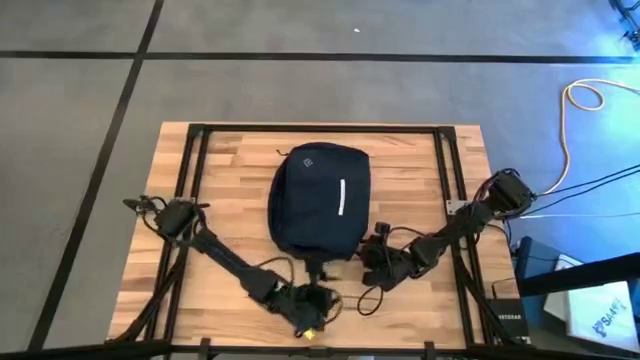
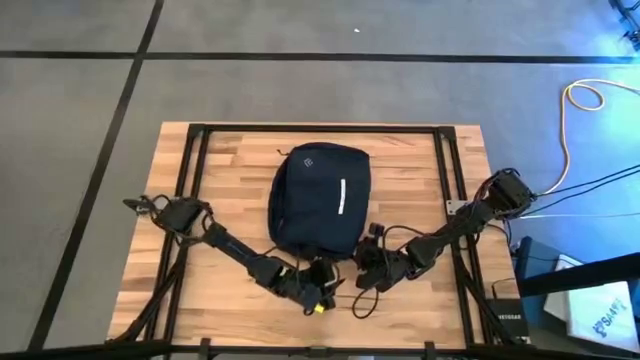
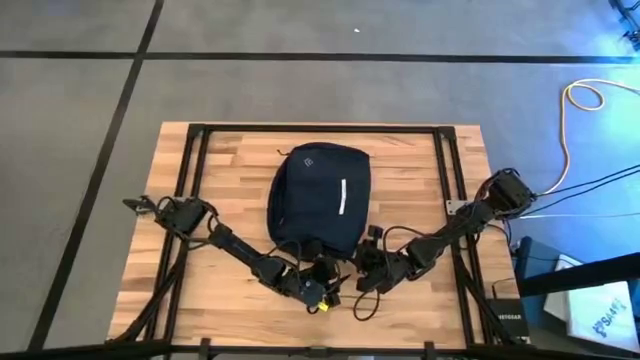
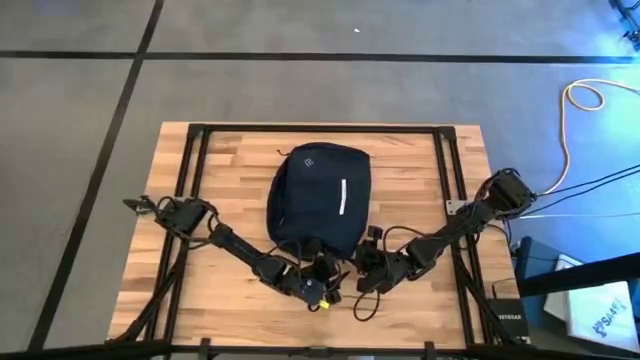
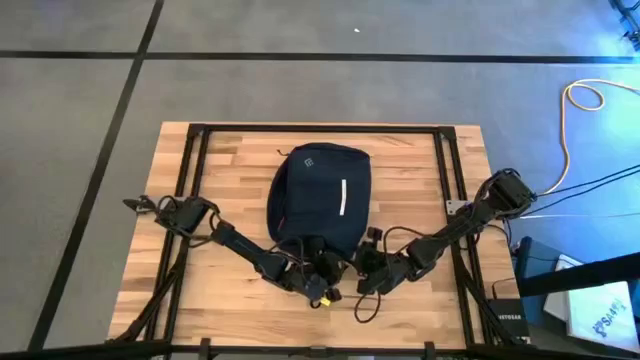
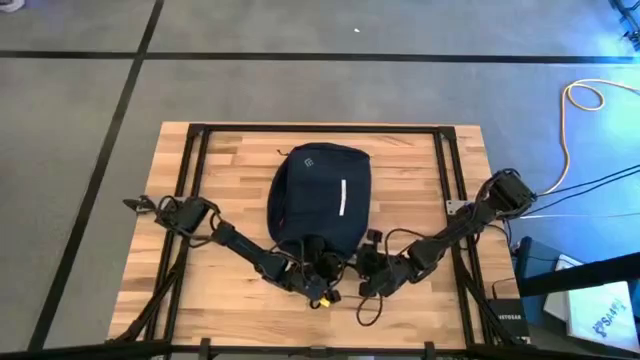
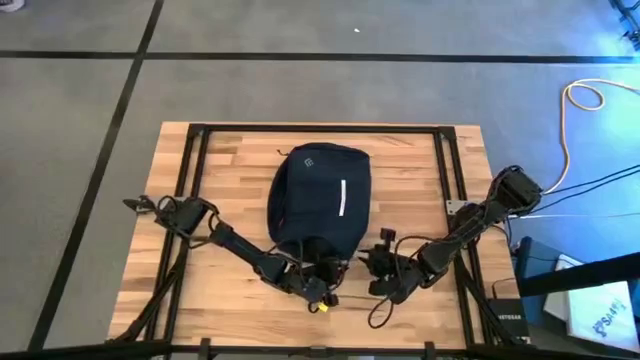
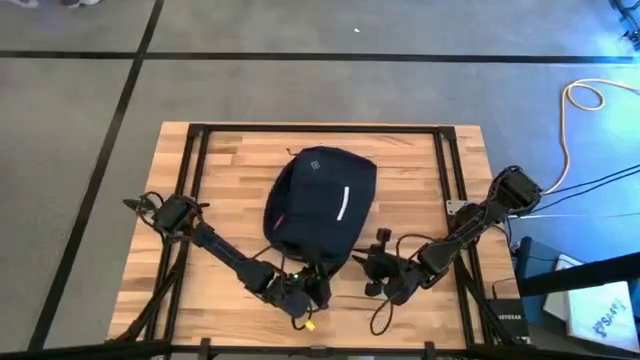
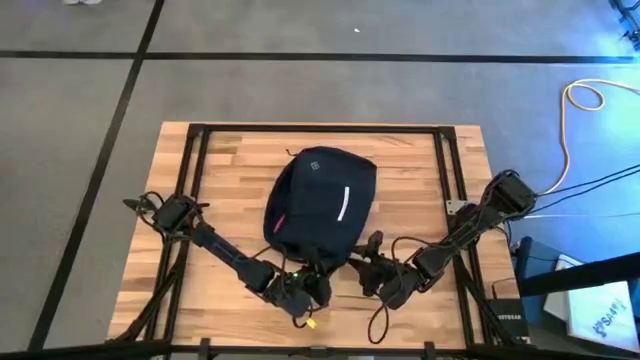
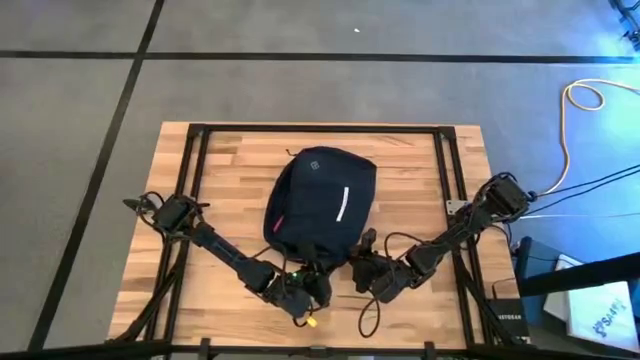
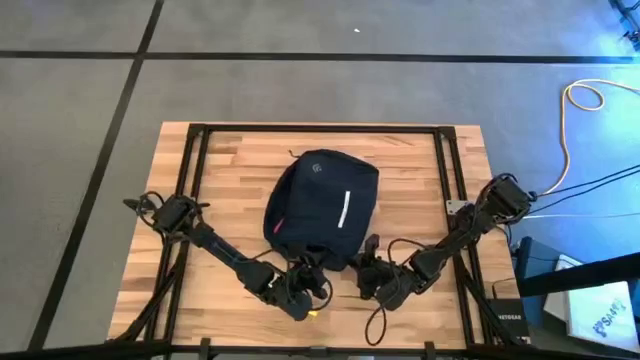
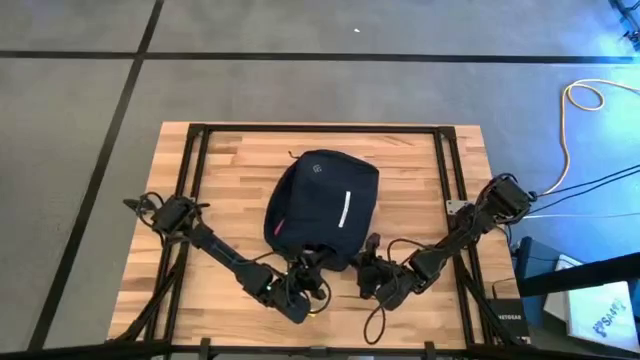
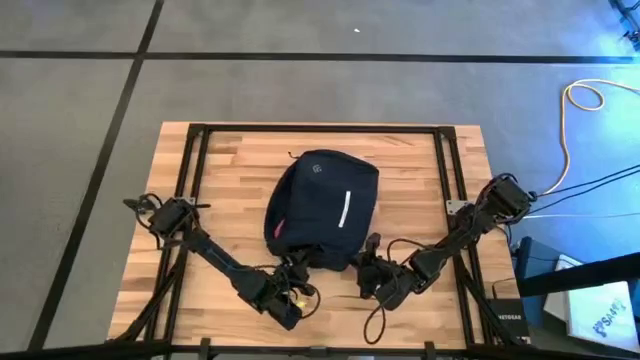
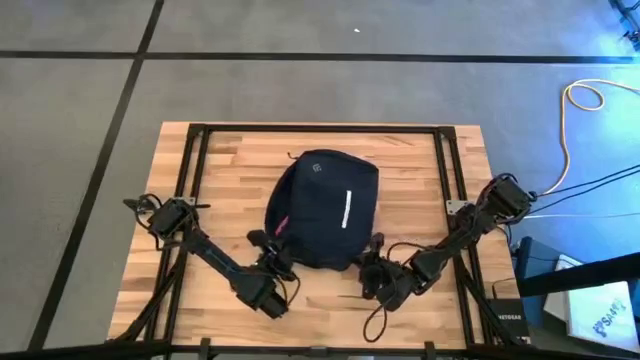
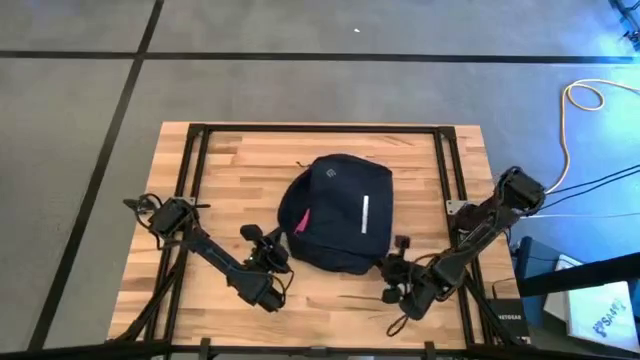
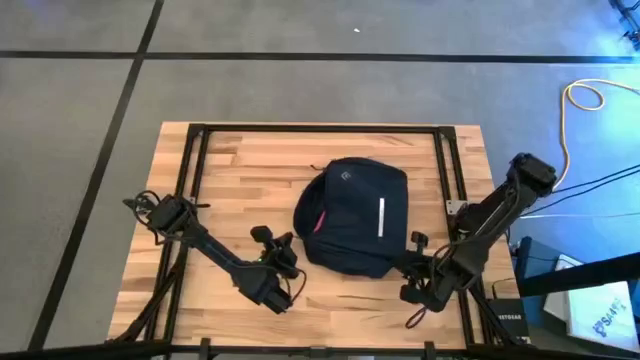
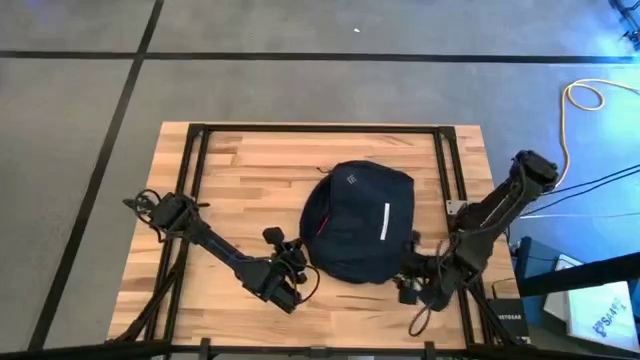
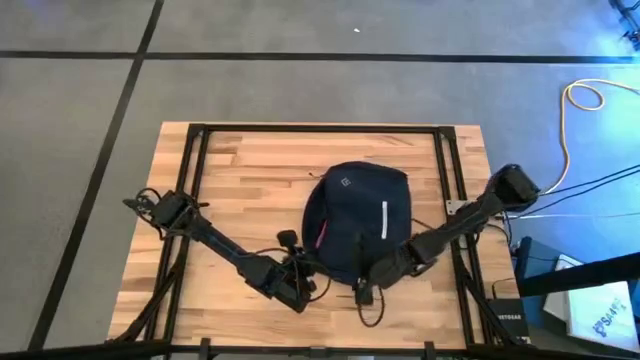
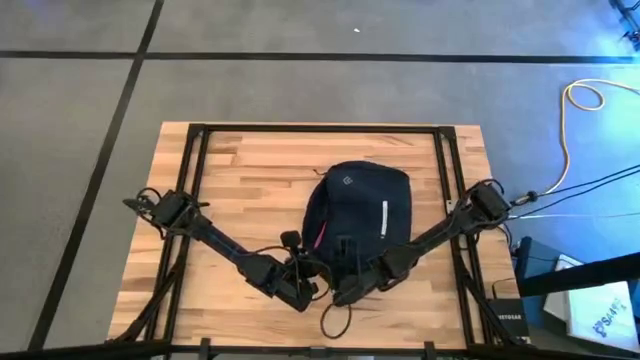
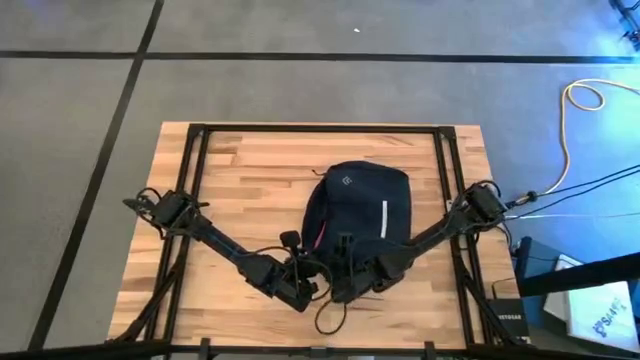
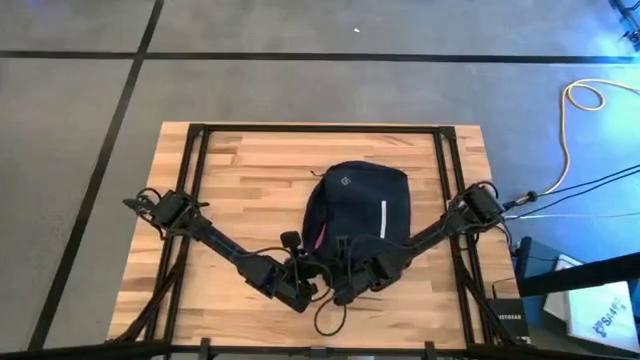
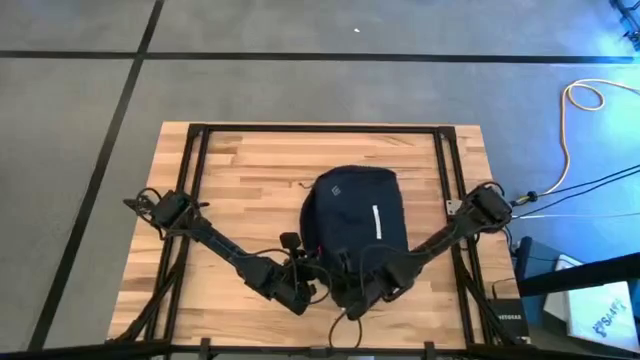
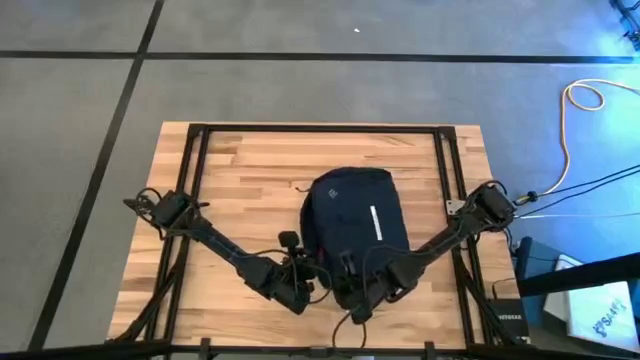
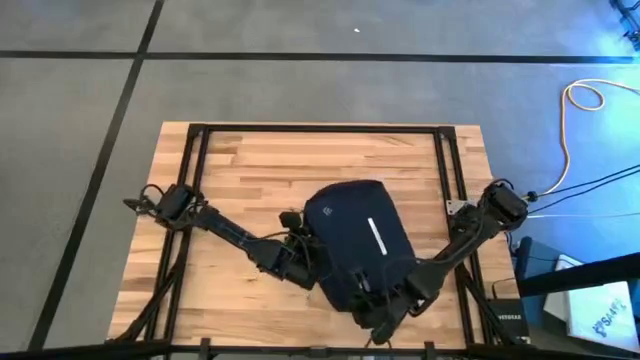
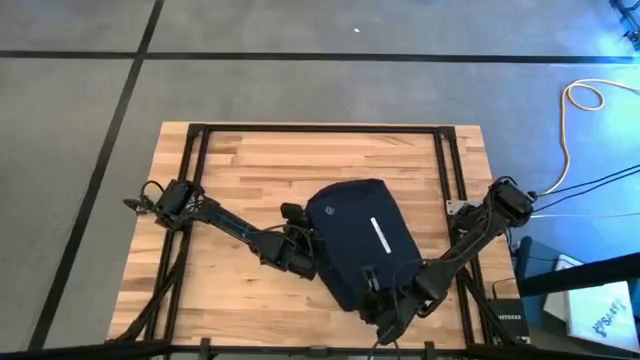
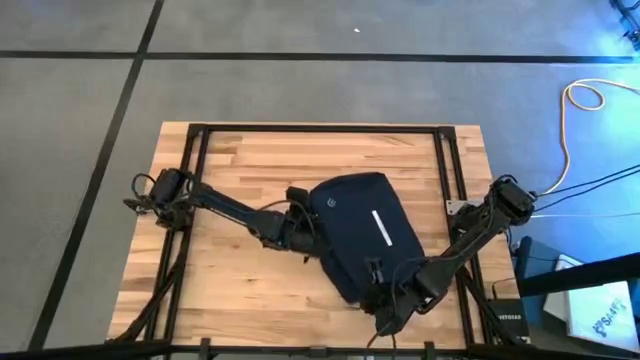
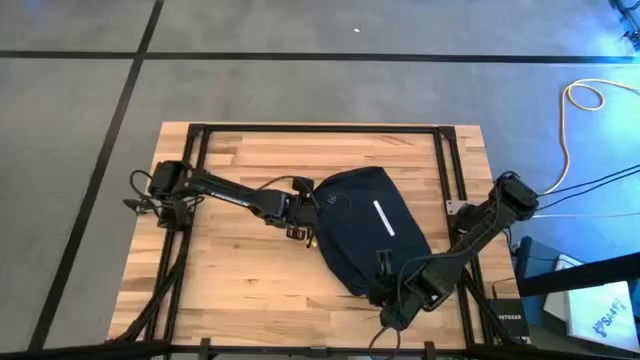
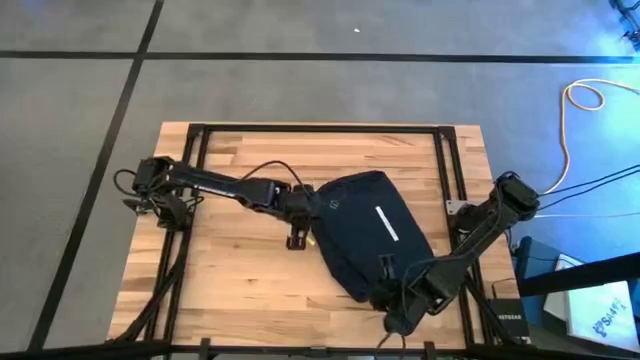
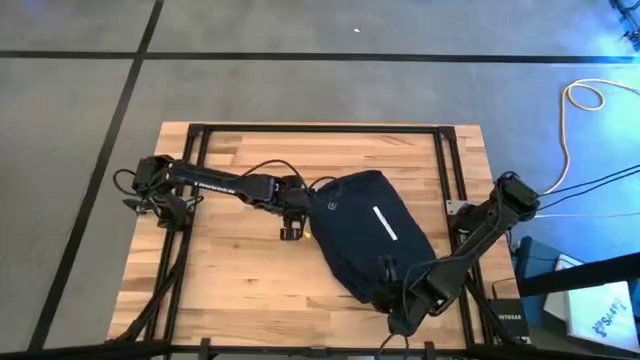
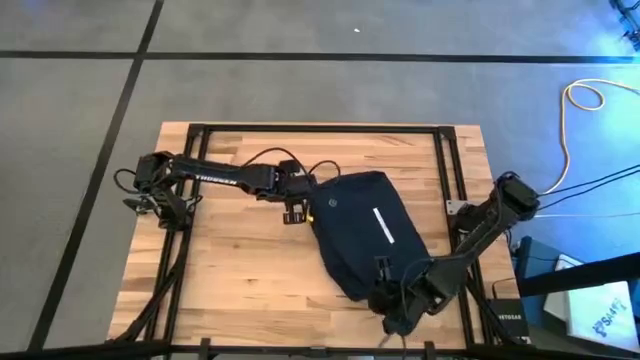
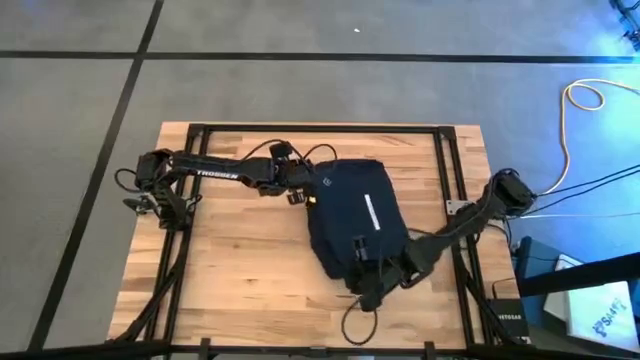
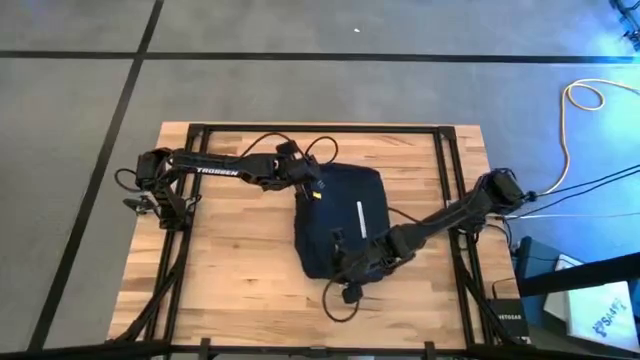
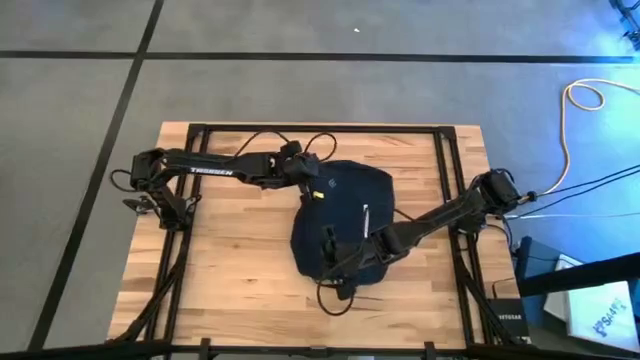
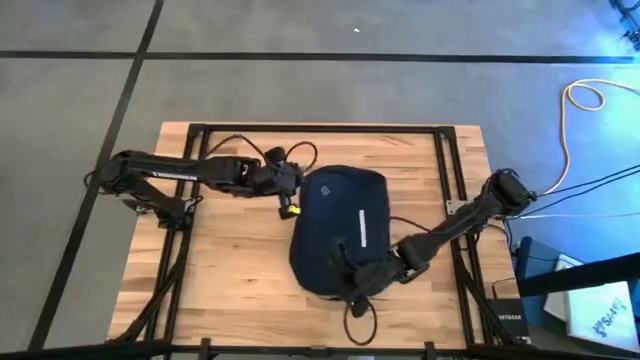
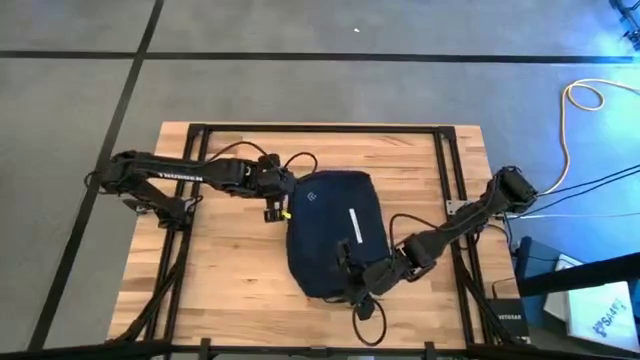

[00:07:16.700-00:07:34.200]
Task: Unpack backpack
Close the blue backpack

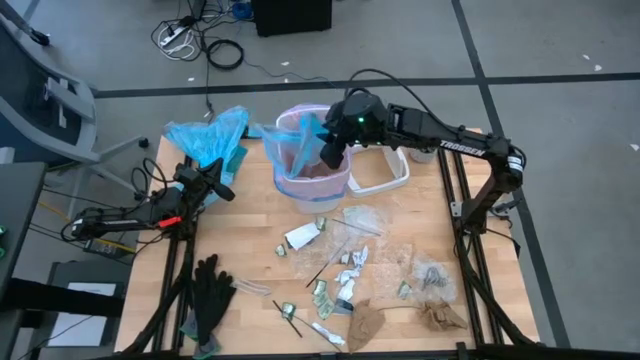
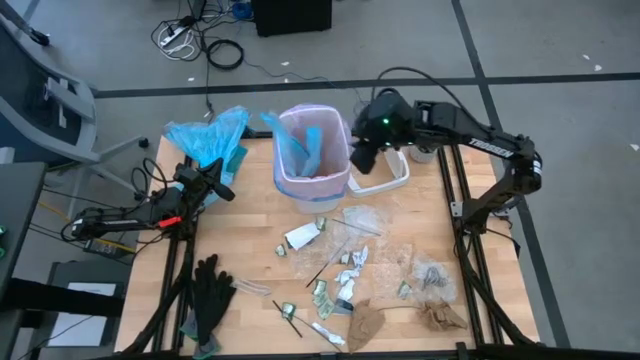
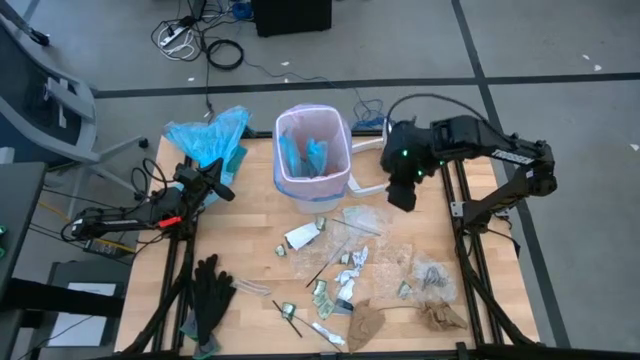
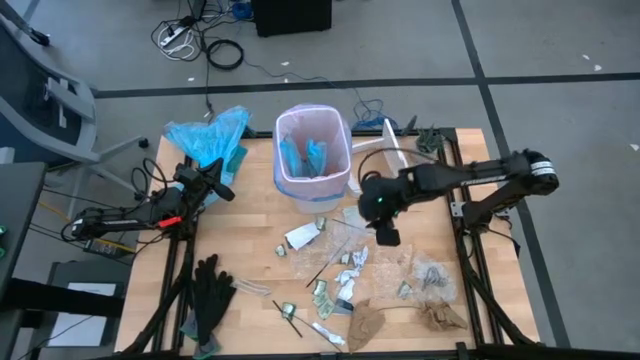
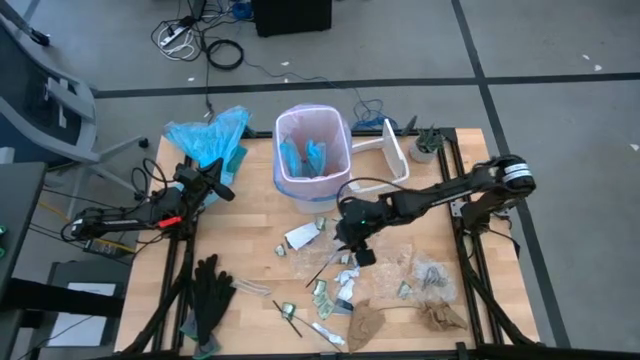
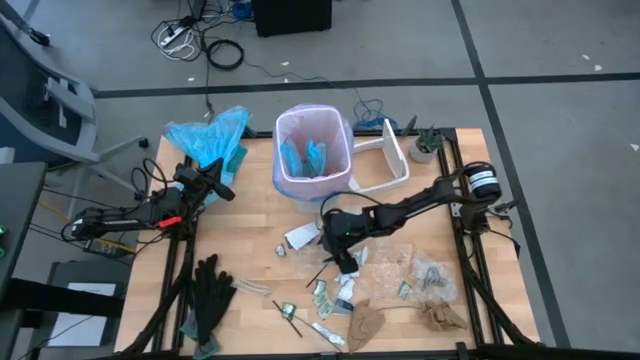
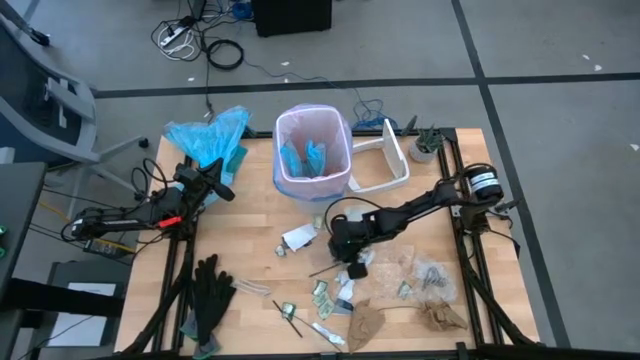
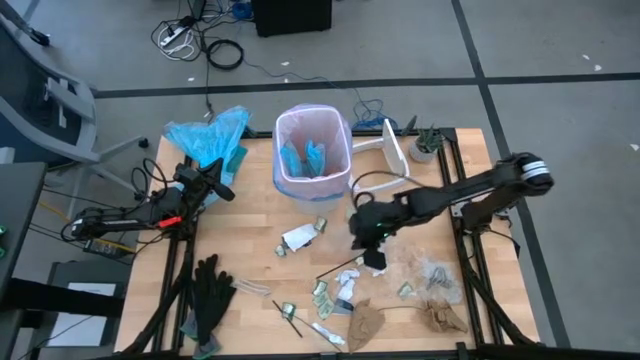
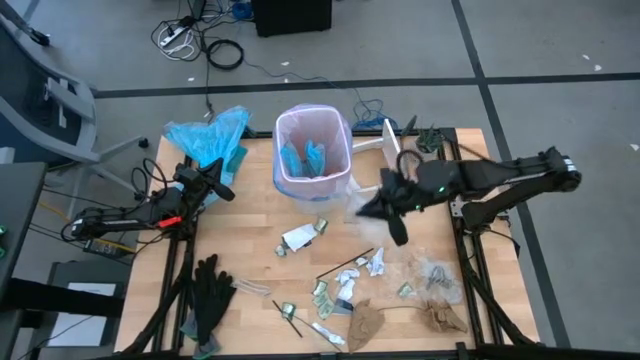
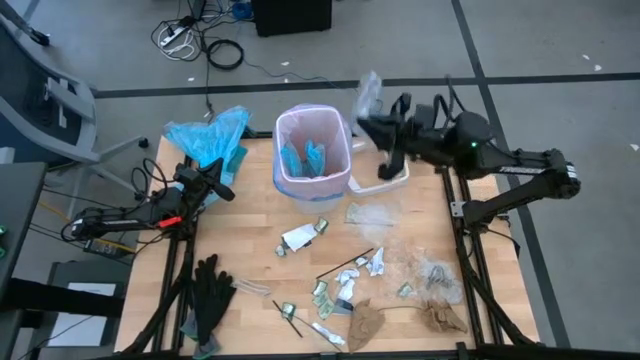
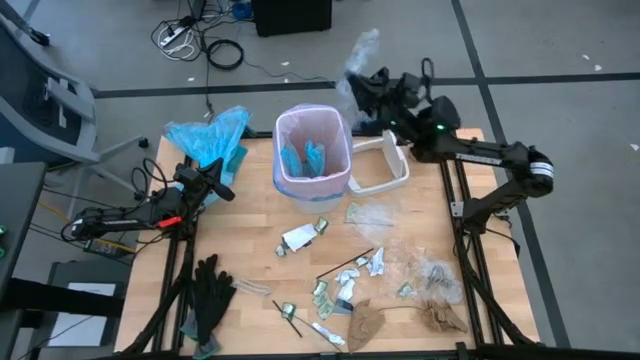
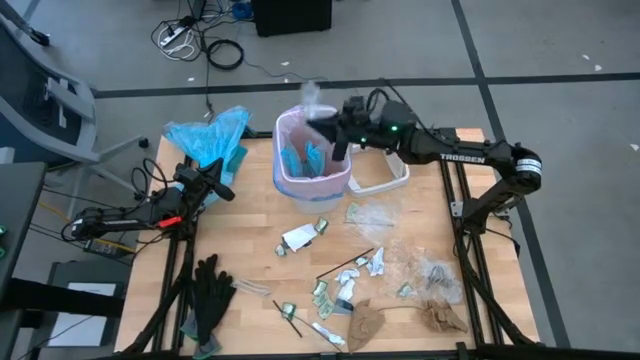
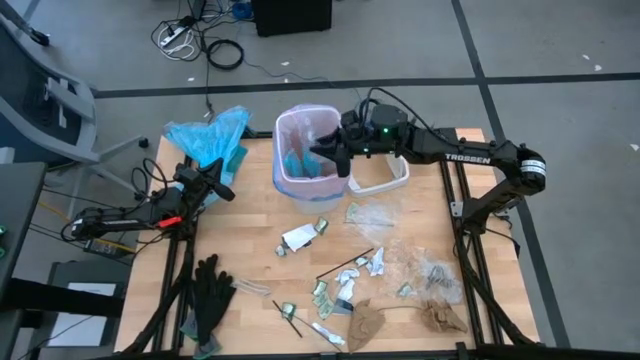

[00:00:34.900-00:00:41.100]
Task: place trash/remove bag and relplace
Put the clear cellophane into the trash bin
